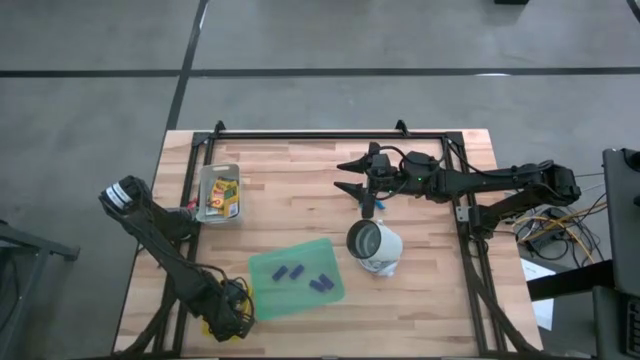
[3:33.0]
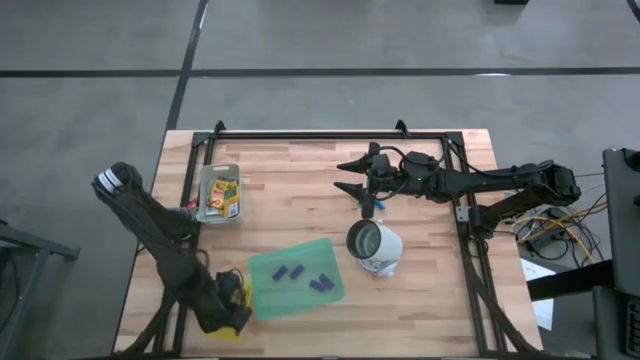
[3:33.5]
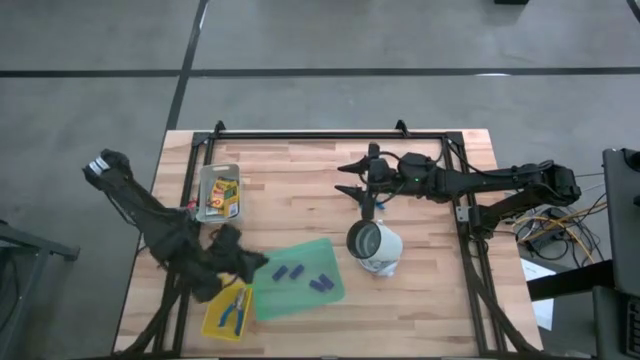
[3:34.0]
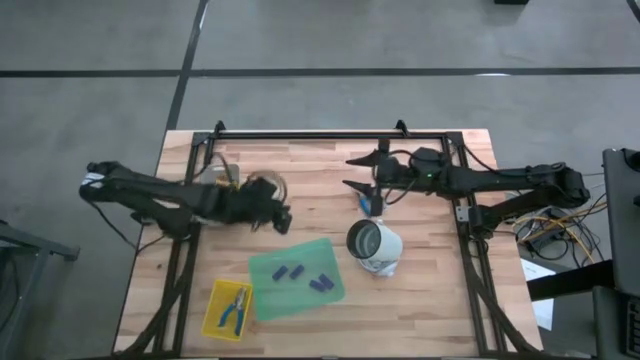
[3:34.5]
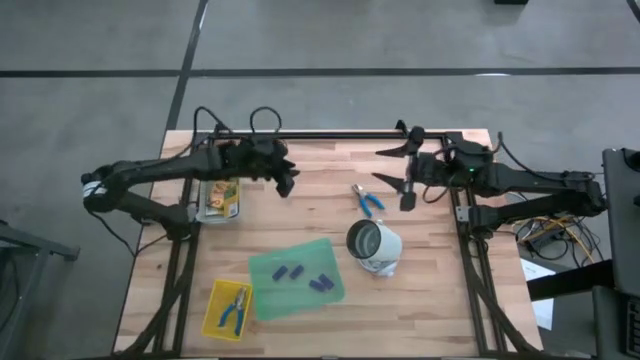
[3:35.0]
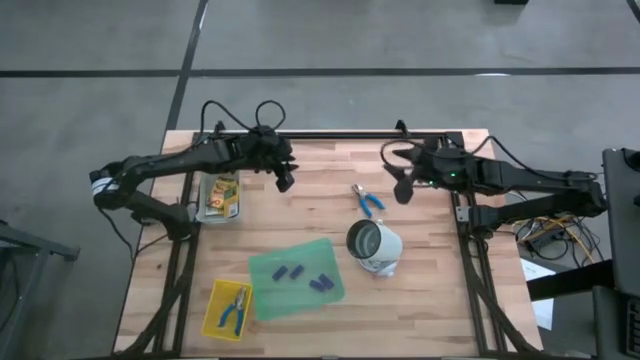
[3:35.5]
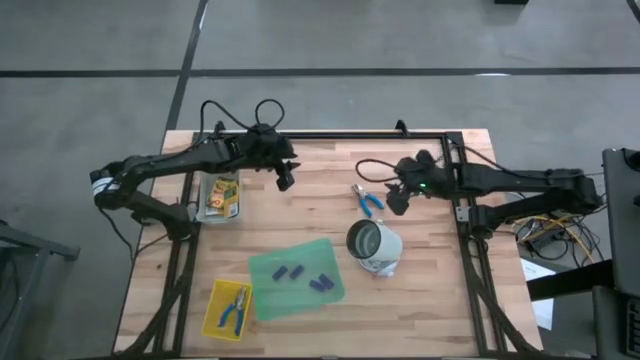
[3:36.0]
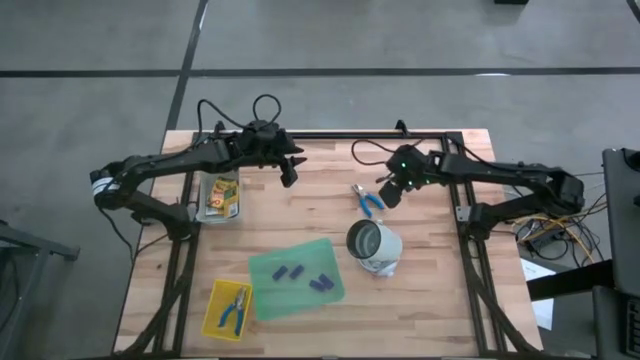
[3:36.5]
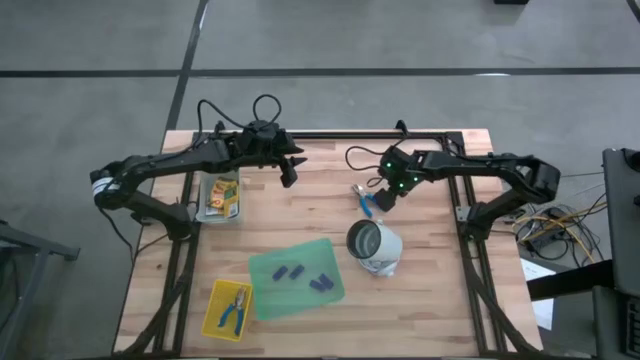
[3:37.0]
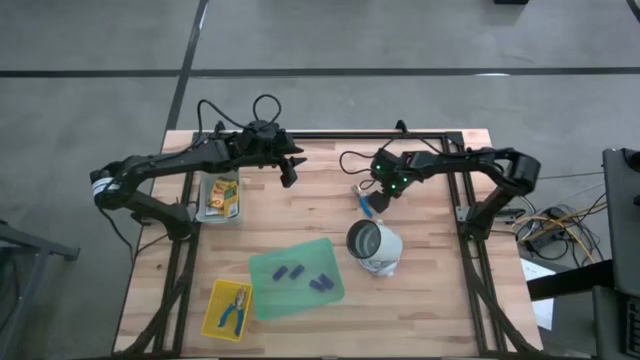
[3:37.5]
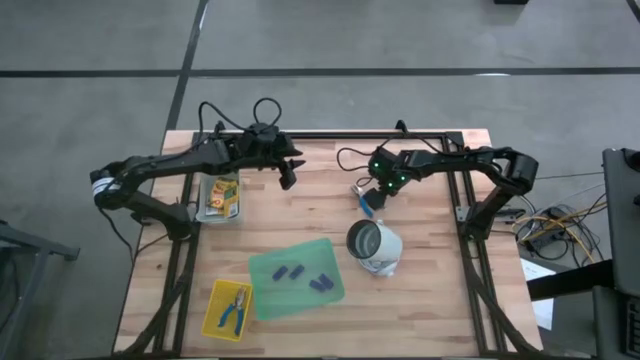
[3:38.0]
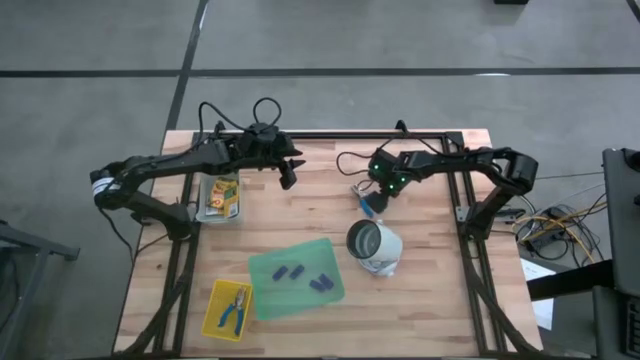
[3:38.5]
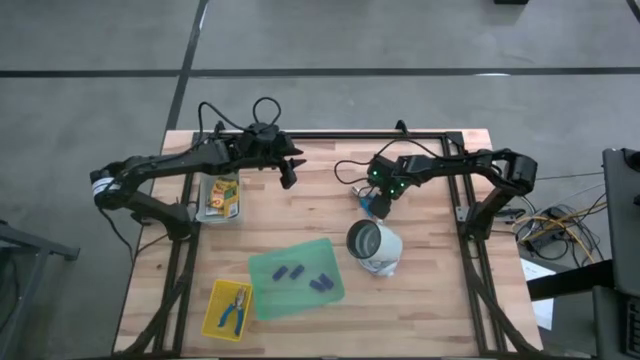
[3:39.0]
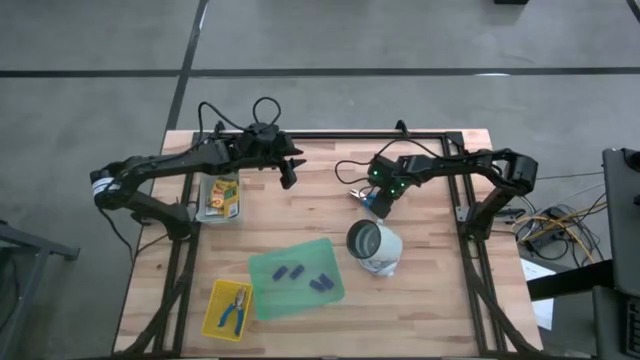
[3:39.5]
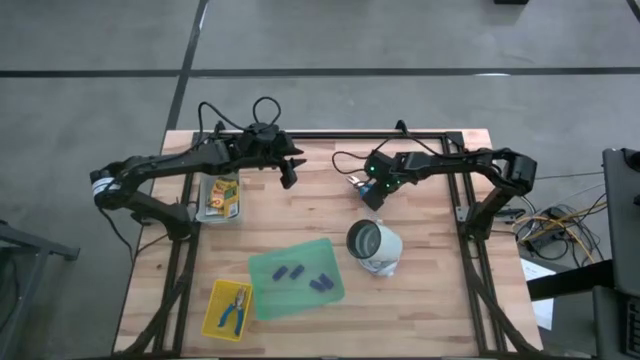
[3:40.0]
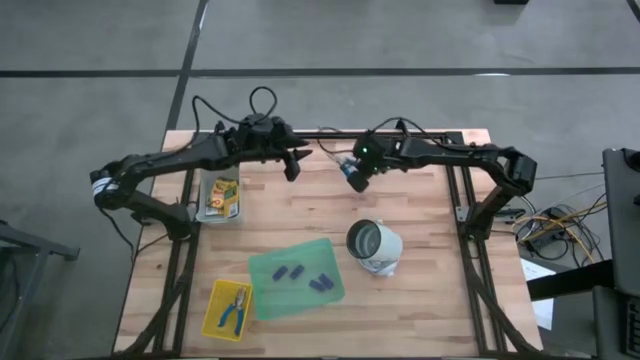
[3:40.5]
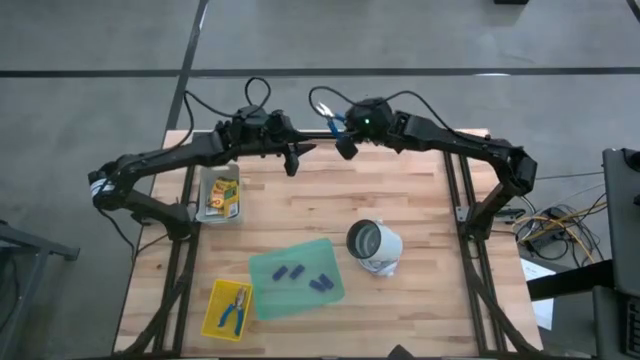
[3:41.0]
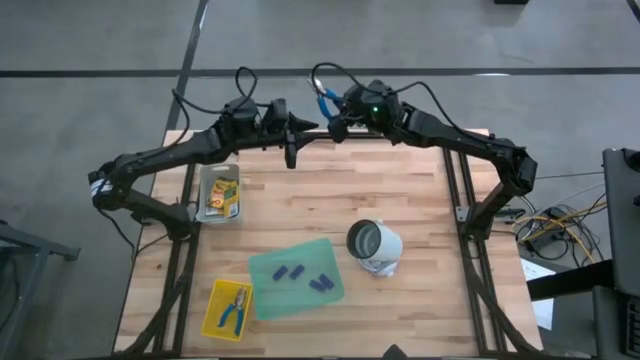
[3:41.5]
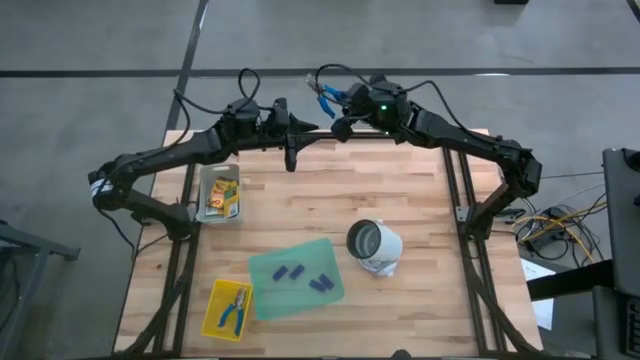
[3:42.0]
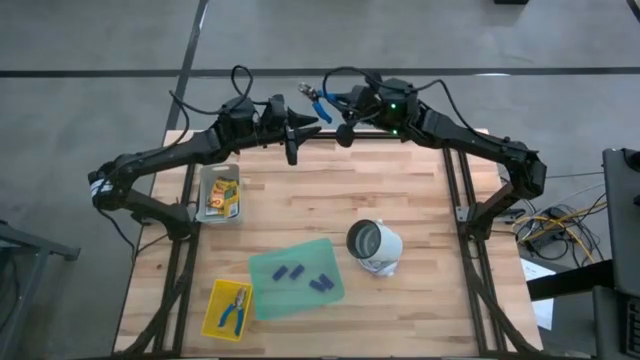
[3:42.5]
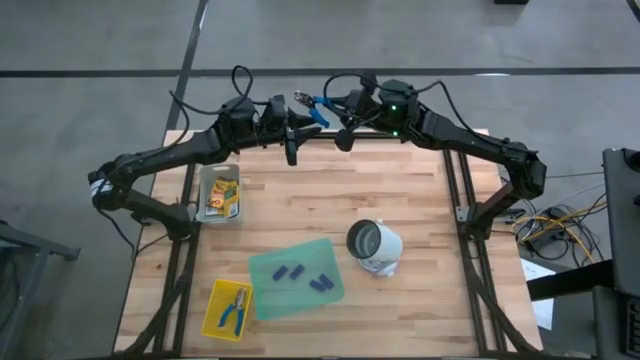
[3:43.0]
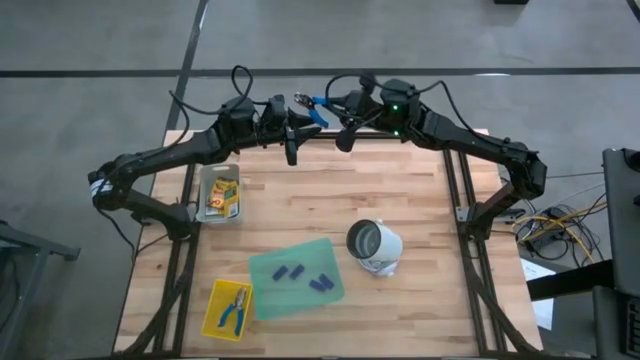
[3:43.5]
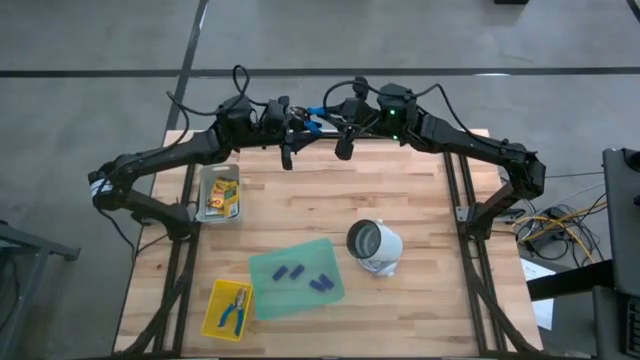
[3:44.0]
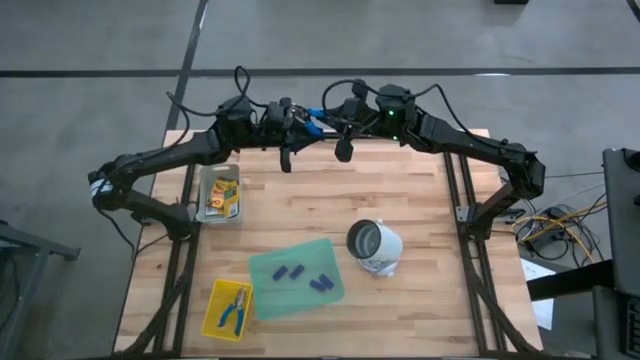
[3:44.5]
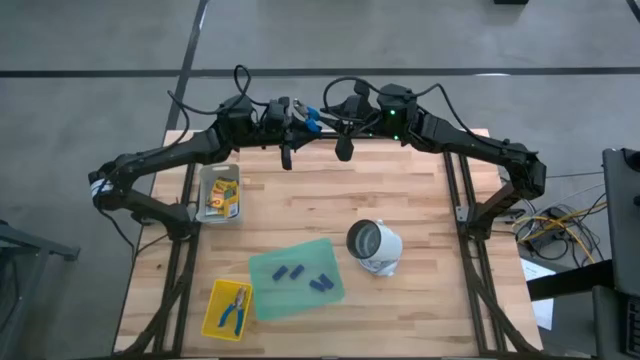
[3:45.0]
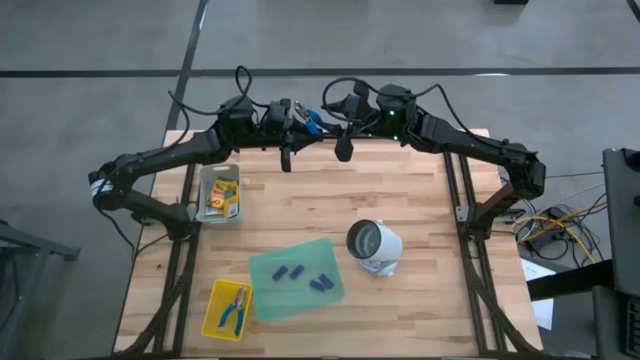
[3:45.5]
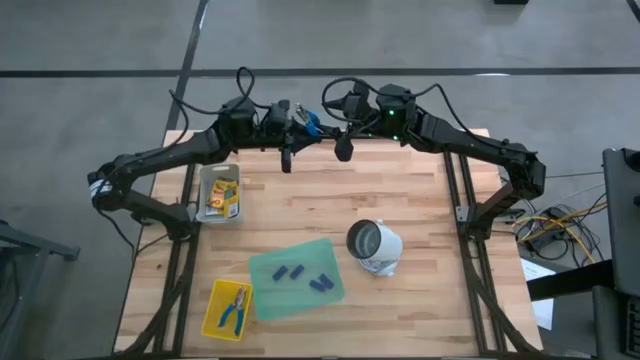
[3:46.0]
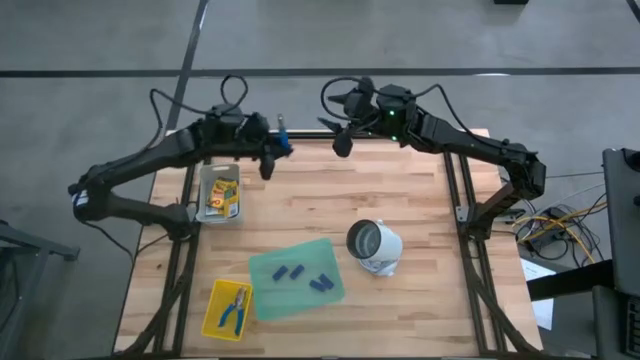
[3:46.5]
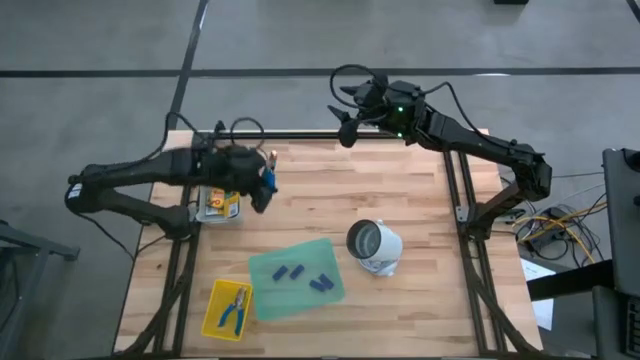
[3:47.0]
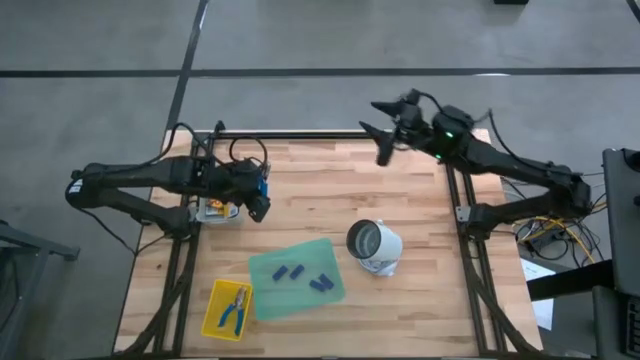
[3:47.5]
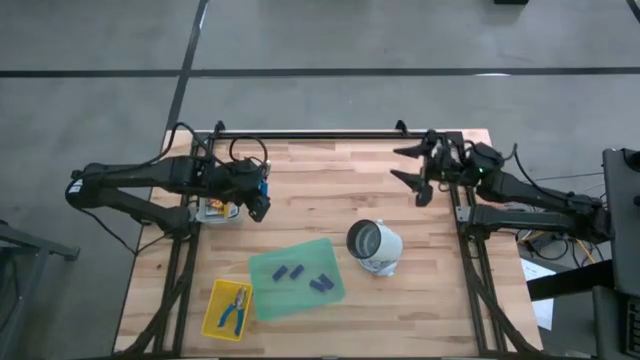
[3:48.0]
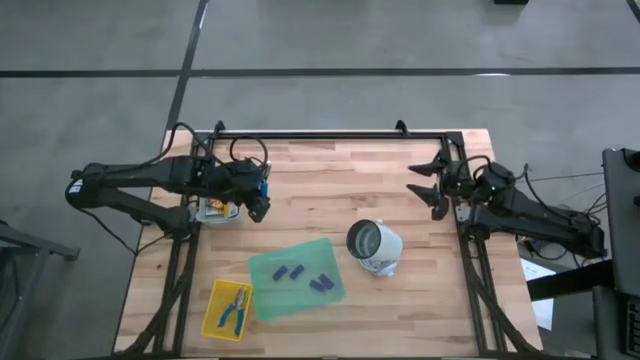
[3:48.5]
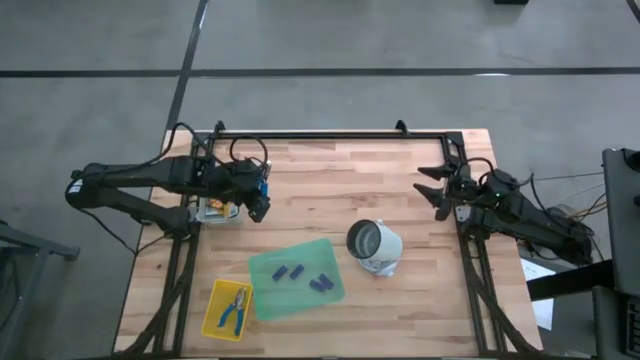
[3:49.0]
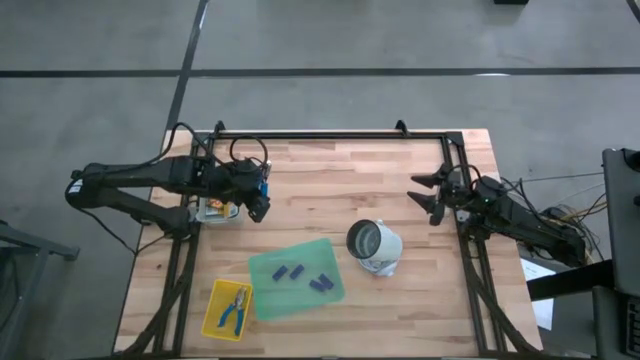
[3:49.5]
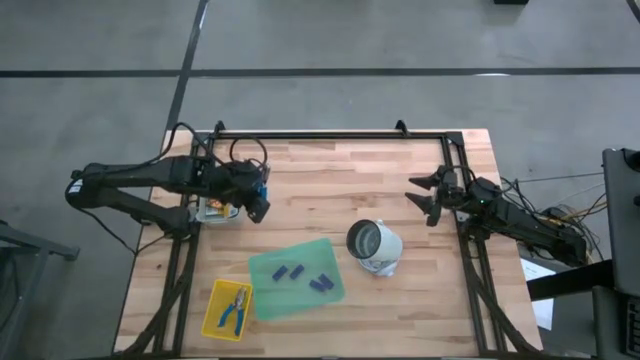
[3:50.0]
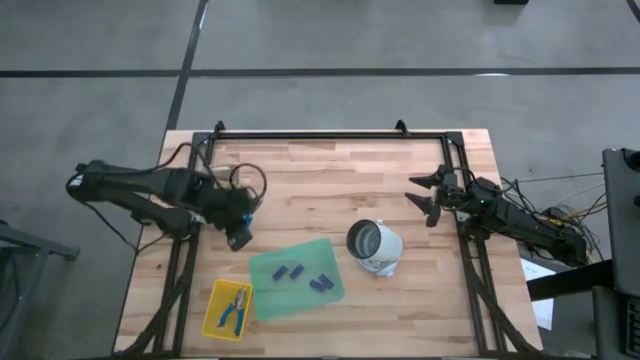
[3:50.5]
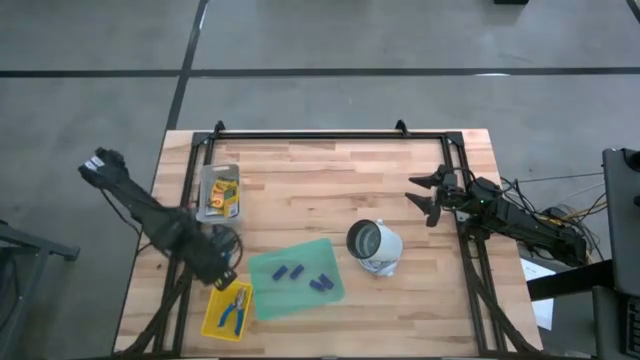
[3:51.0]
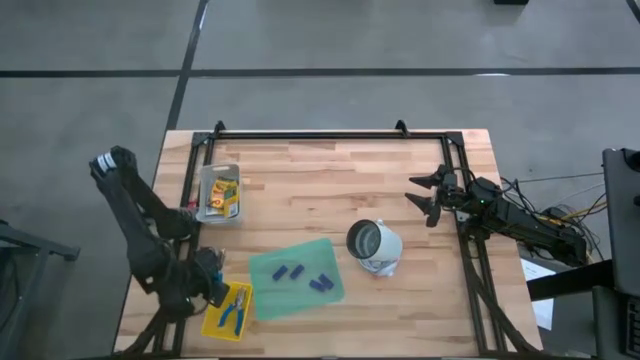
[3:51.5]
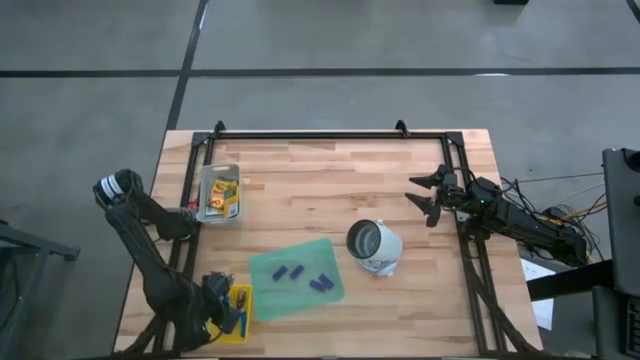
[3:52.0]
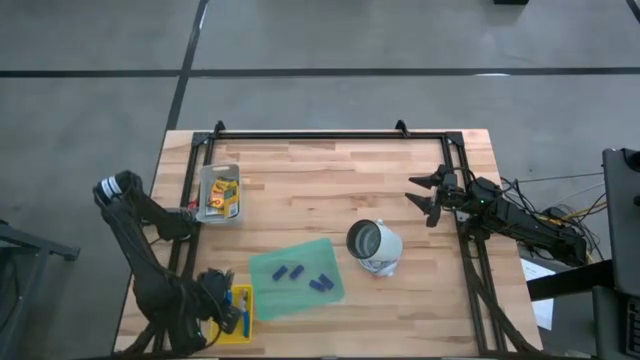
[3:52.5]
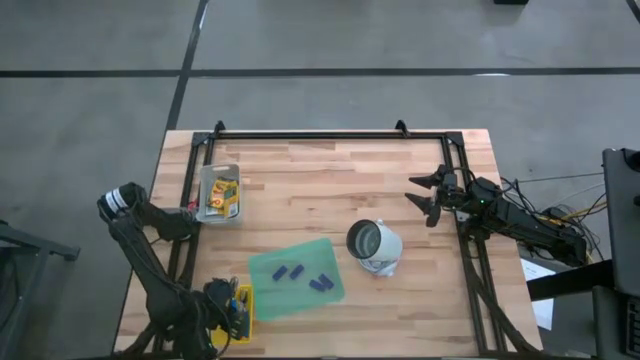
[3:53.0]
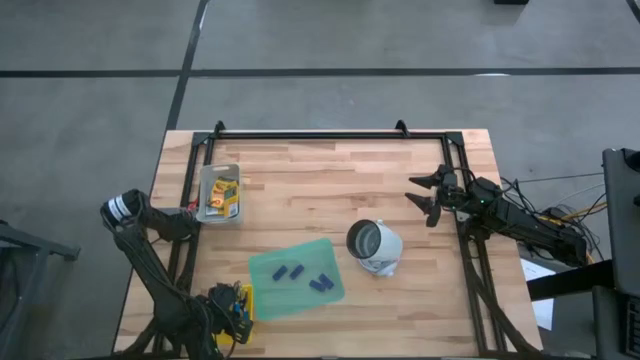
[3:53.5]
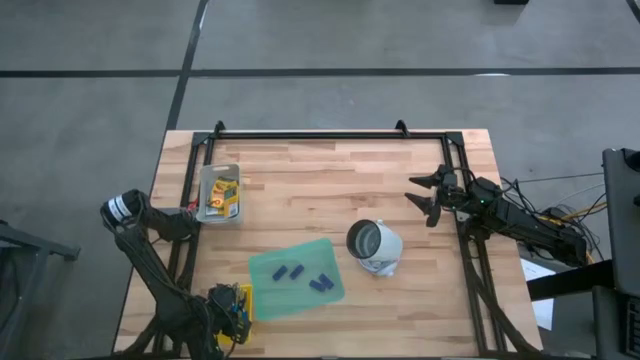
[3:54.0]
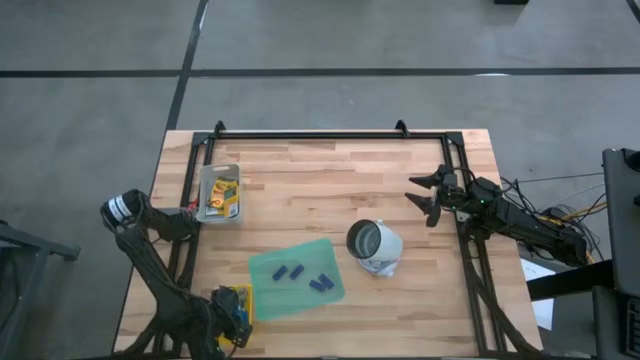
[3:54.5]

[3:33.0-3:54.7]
Task: Pick & Place School Supplies
Put the blue hole puncher into the yellow bin

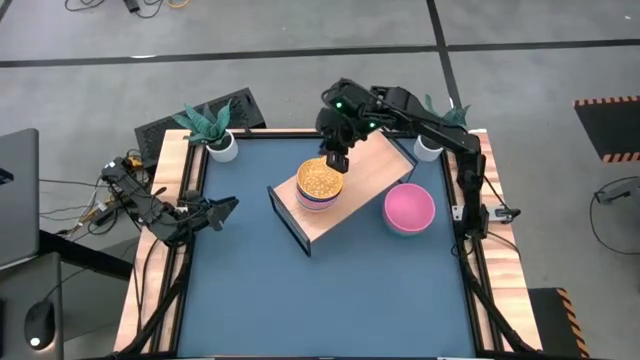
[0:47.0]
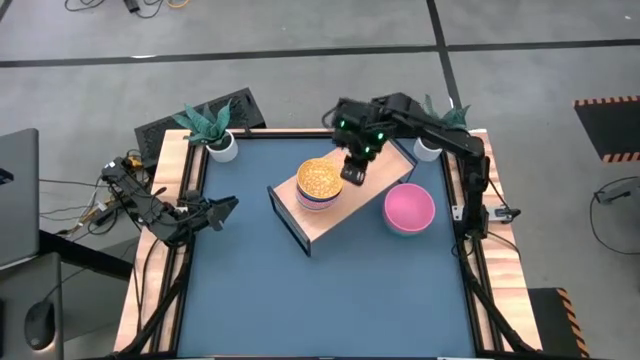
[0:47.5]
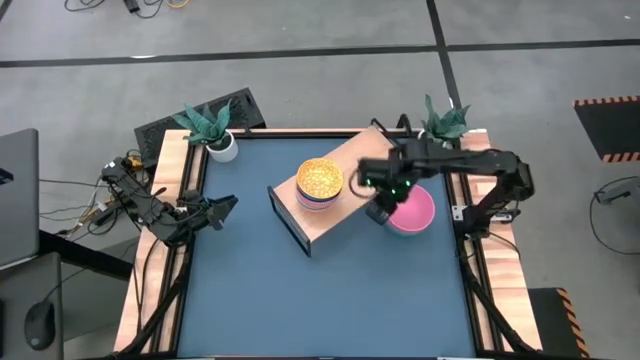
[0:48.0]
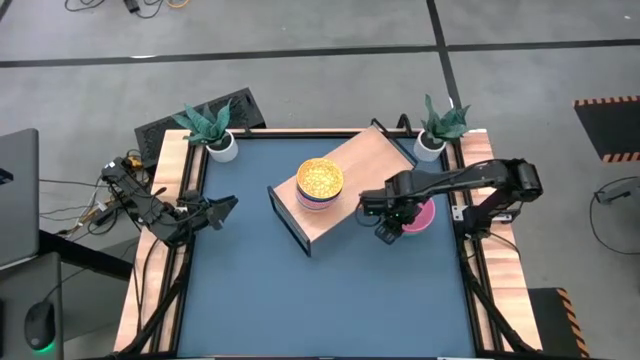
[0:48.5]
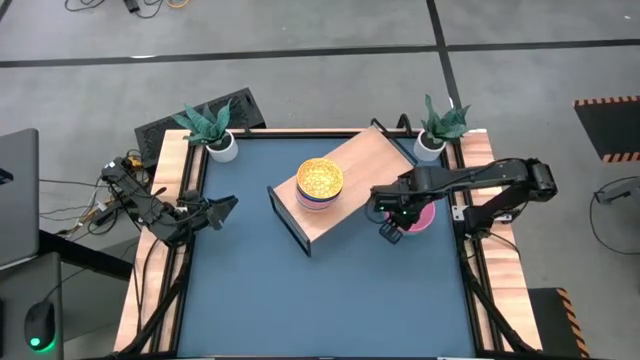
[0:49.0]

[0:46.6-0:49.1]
Task: Place and stack bowls onto a shelf
Put the pink bowl on the shelf
